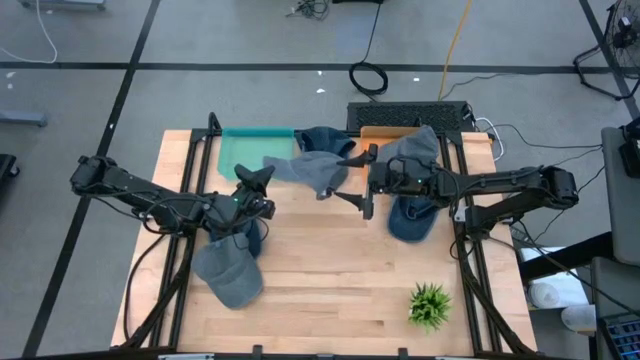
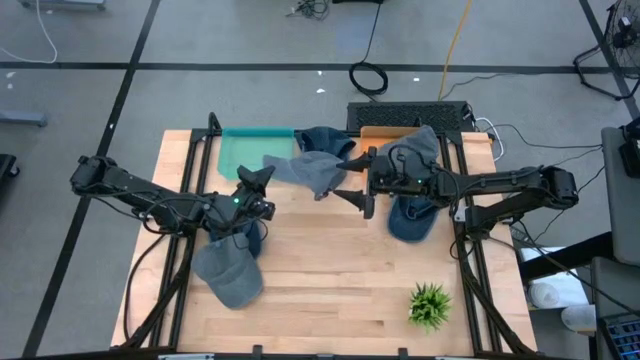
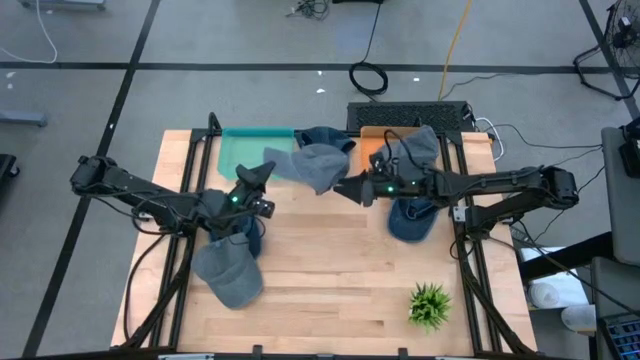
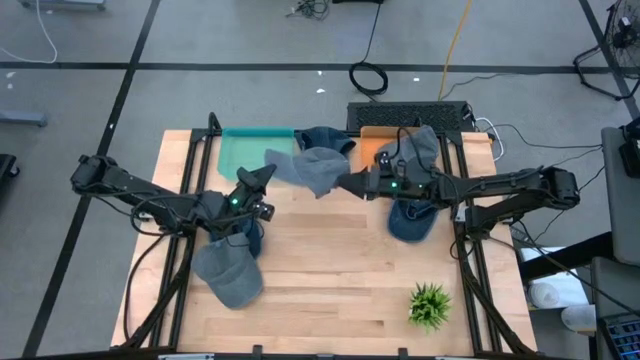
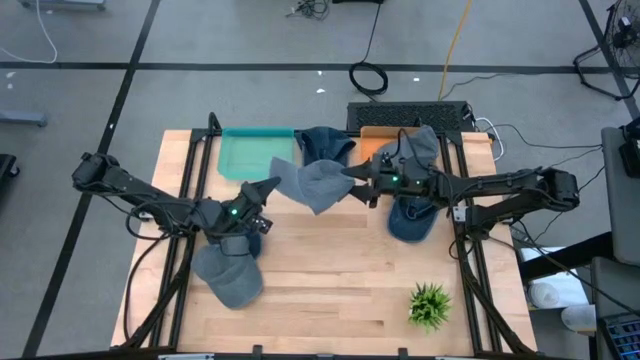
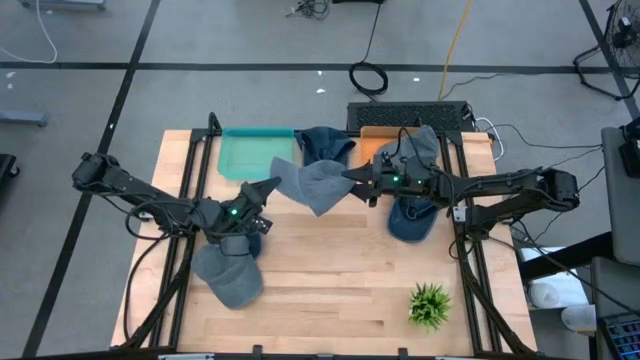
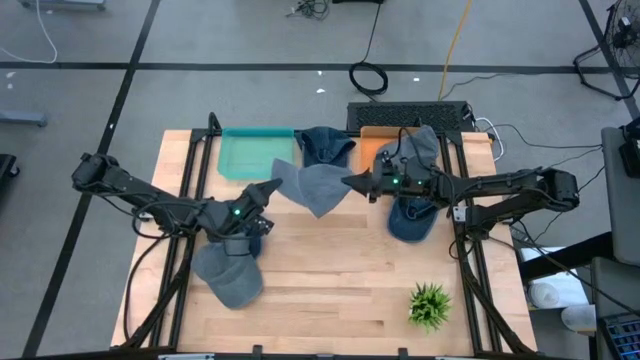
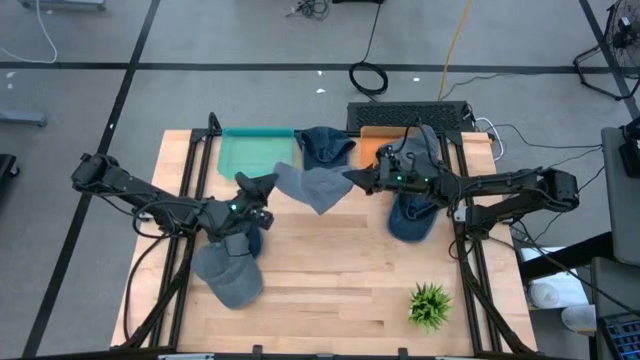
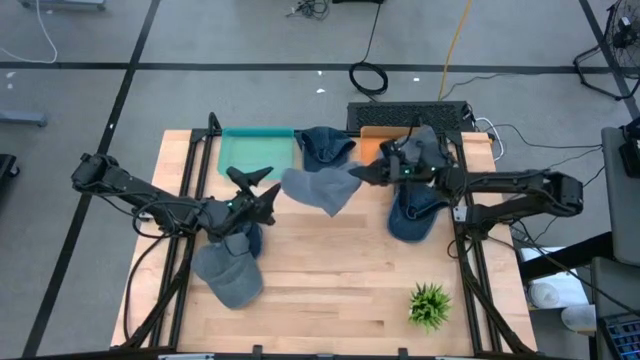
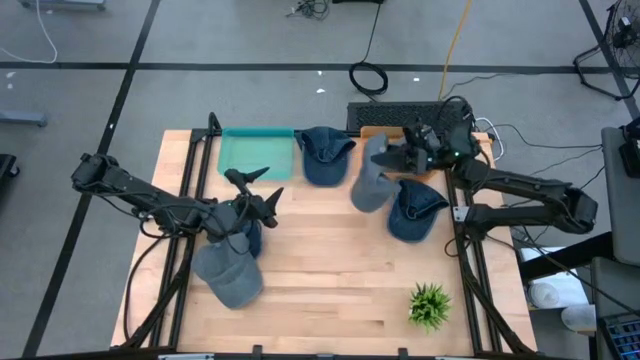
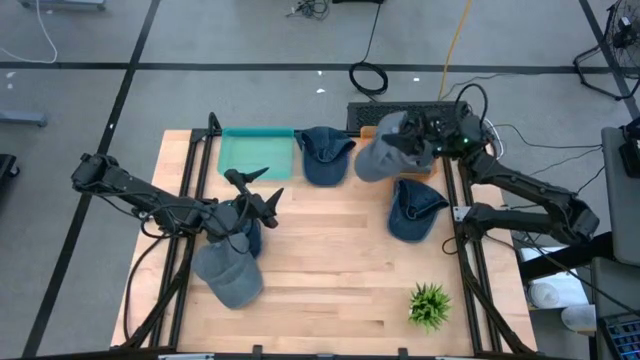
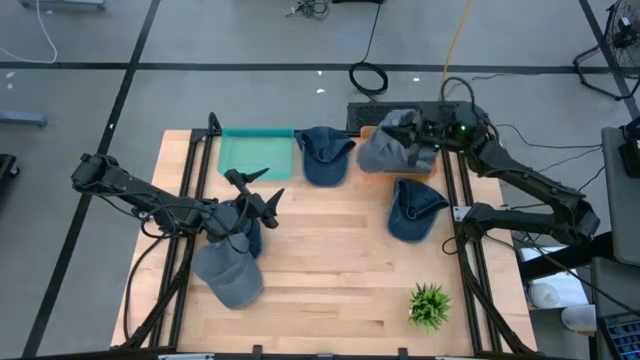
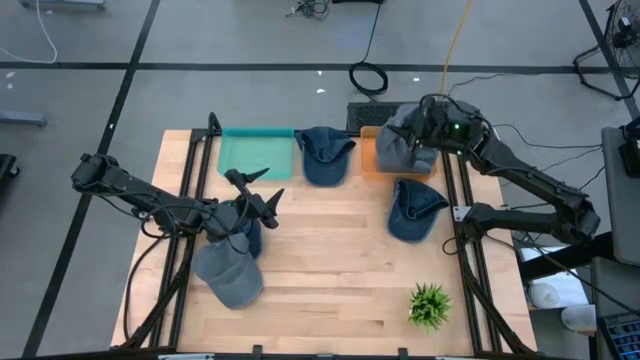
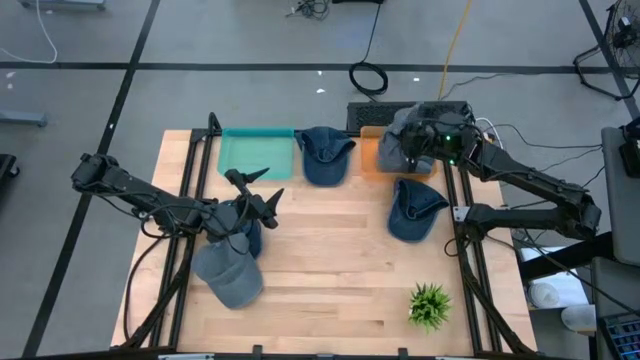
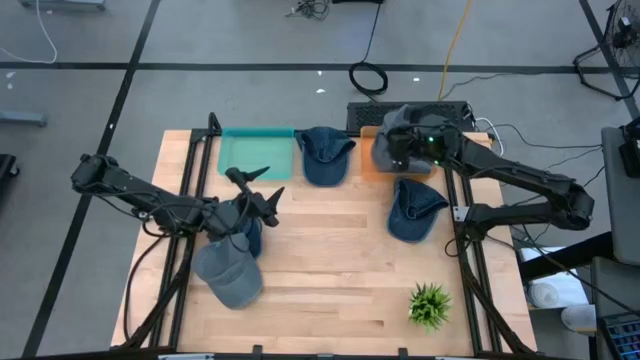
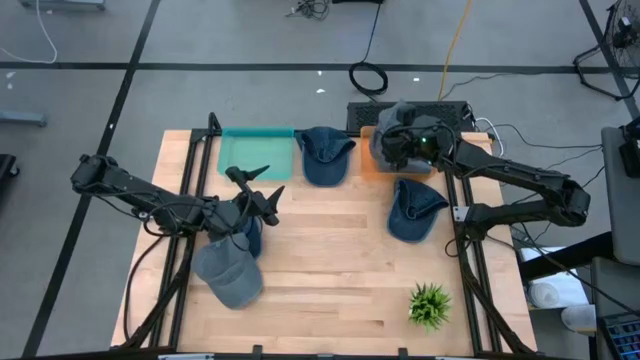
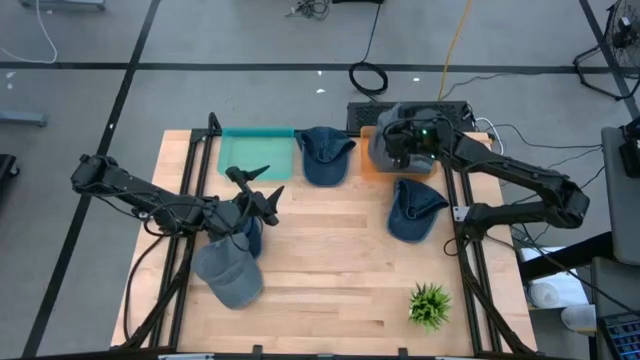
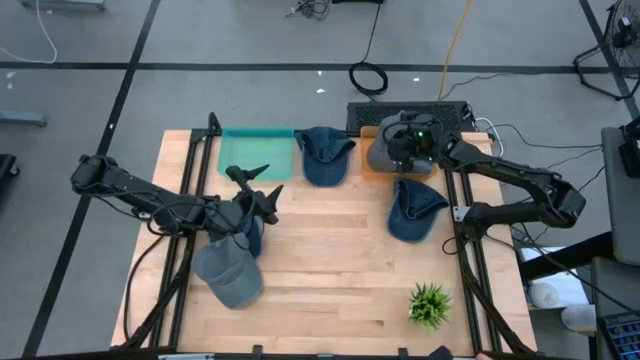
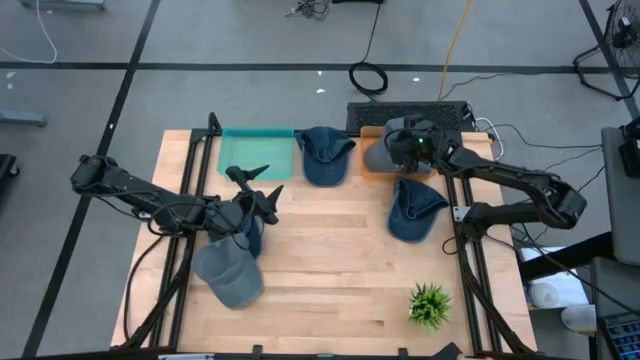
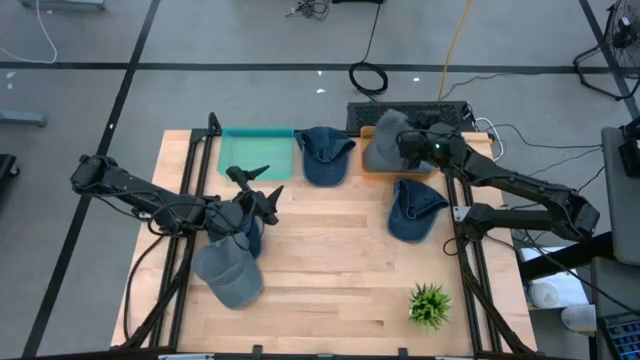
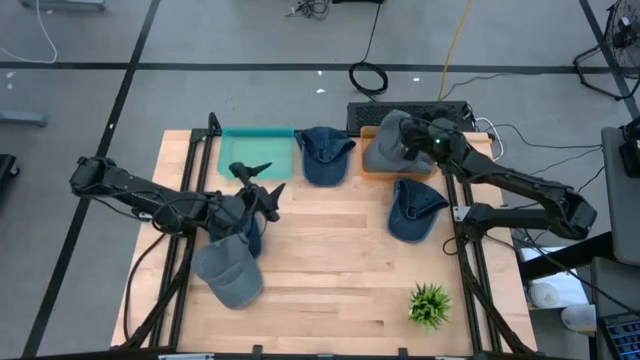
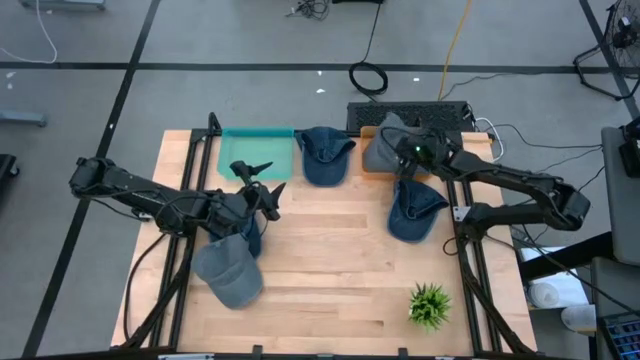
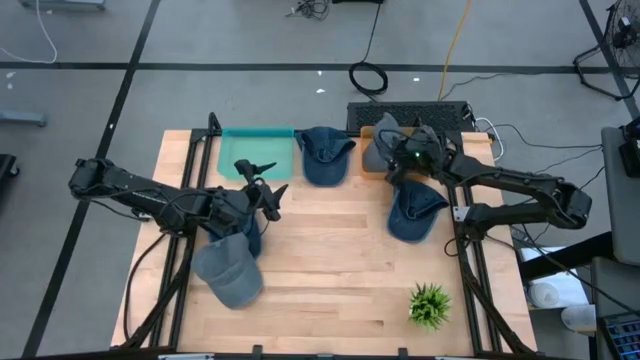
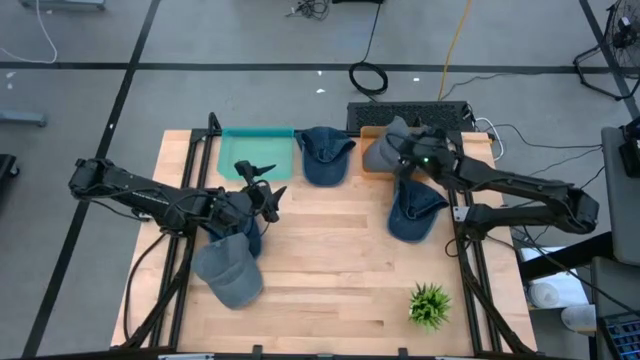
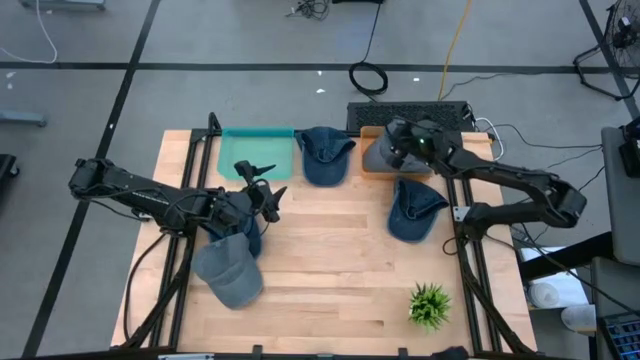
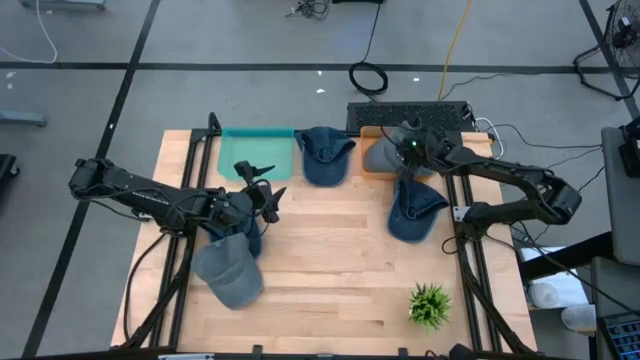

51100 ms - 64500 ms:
Task: Pick & Place hat
Put the top gray cap into the orange bin

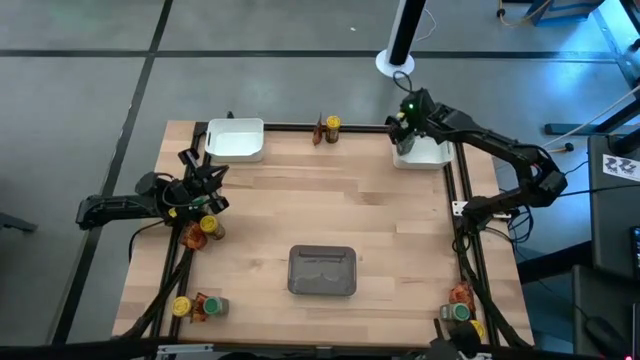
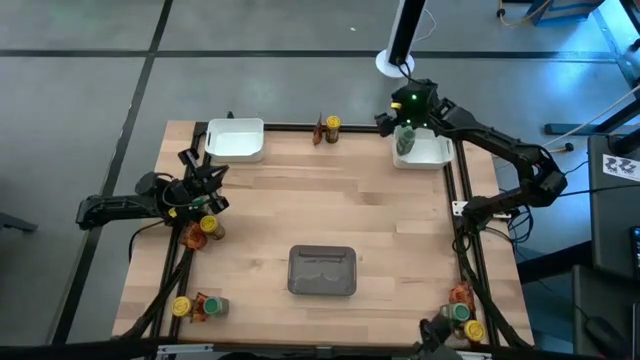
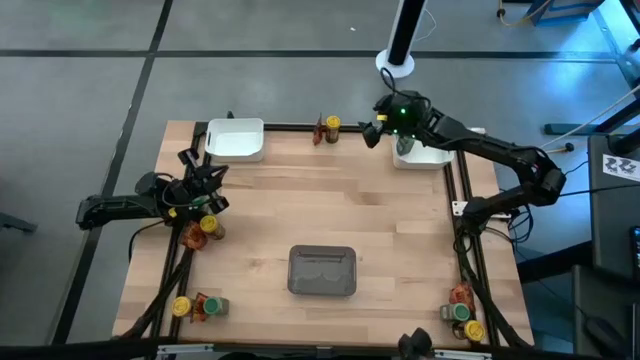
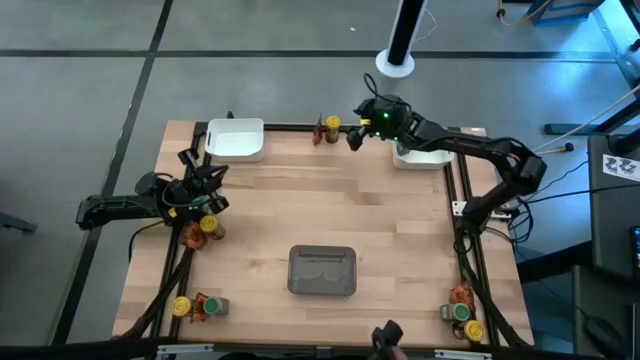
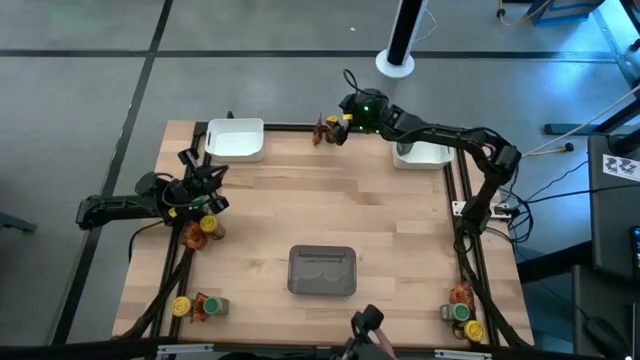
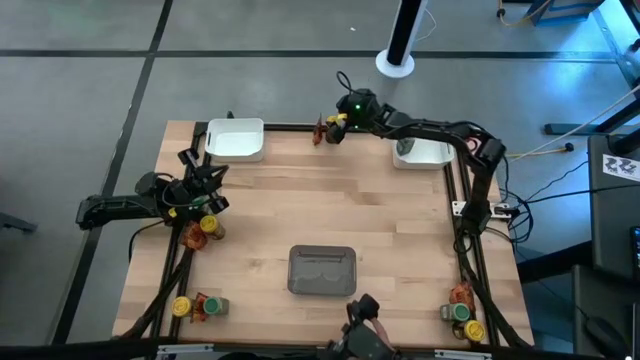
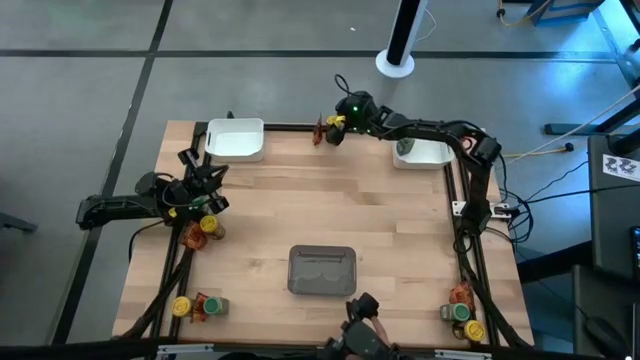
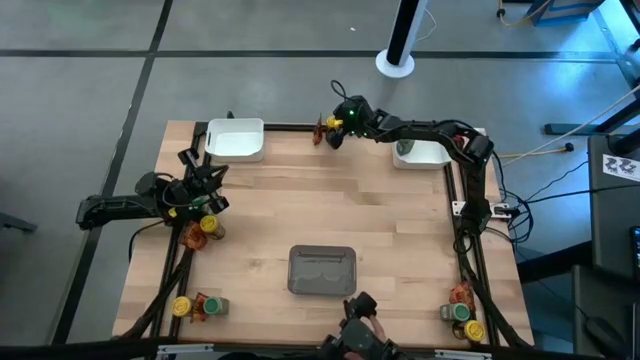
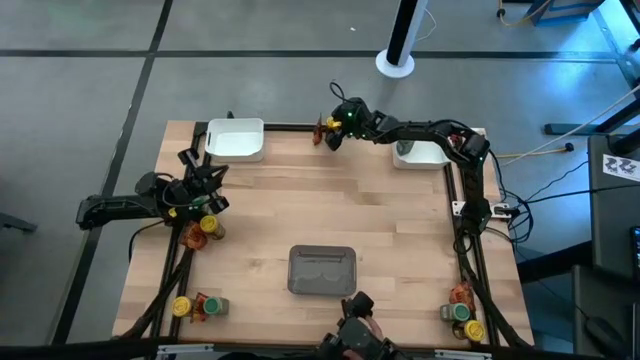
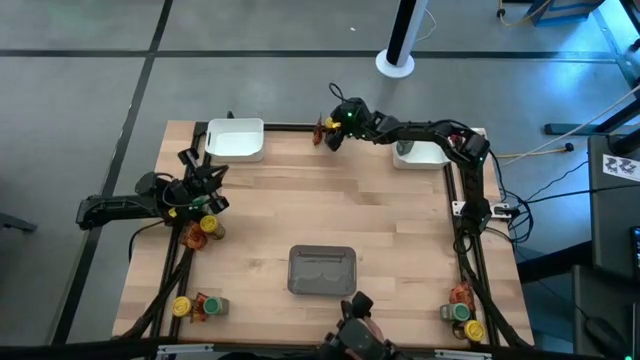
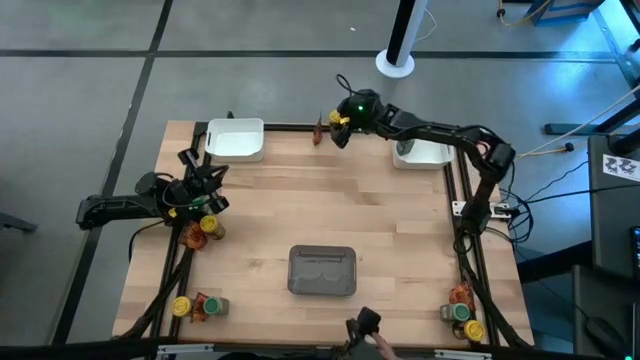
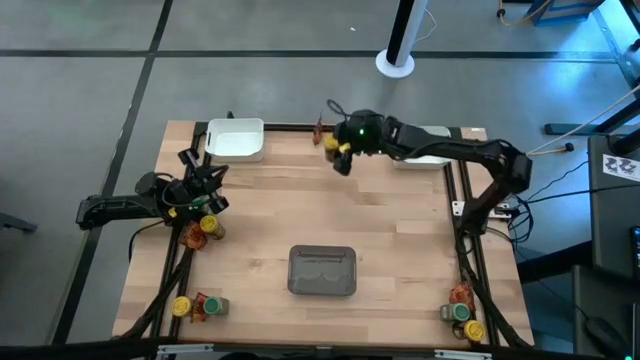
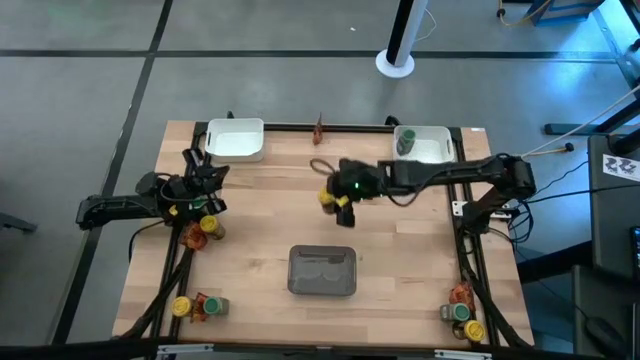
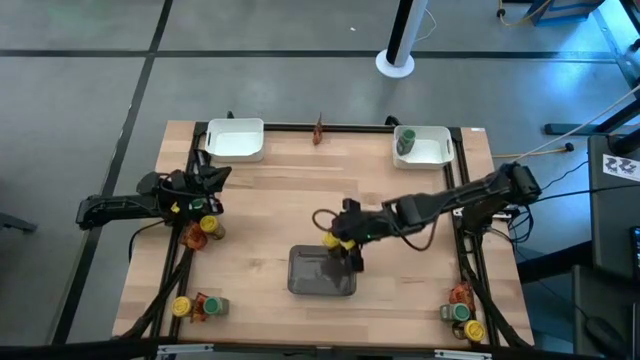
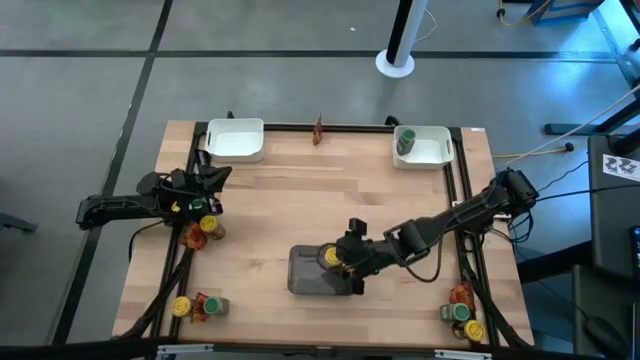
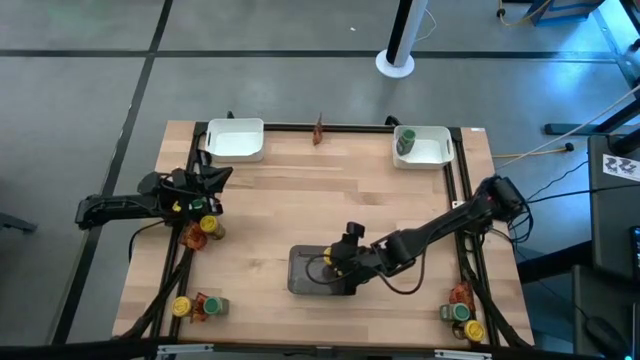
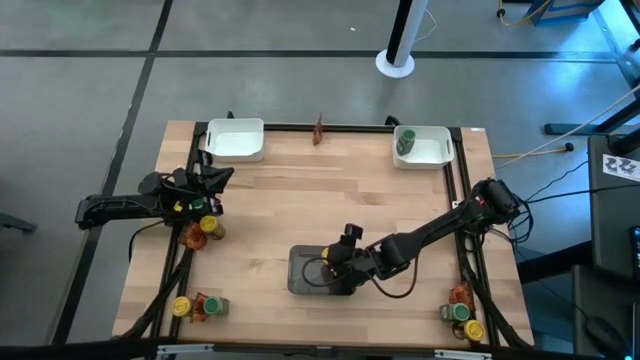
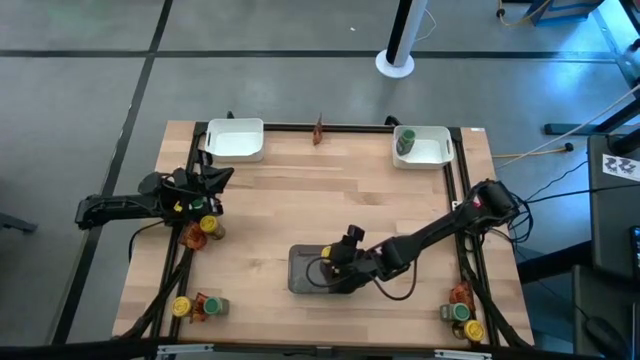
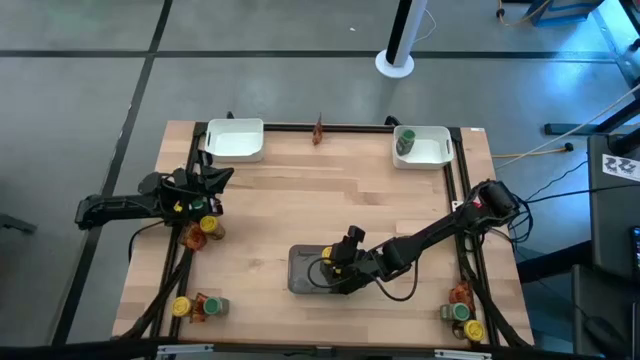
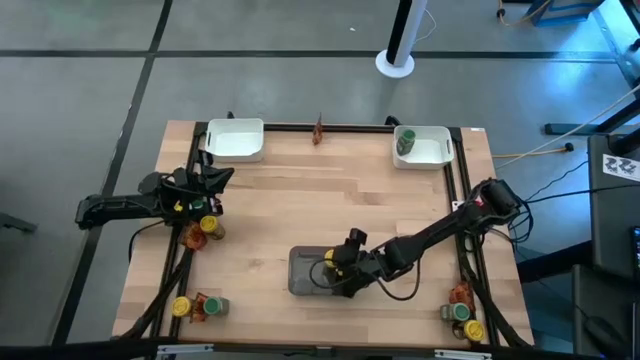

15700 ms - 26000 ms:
Task: Sort spices by type
Put the top center yellow seasoning bottle into the black bin
